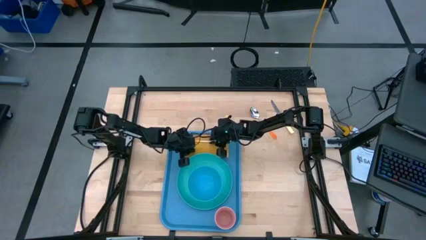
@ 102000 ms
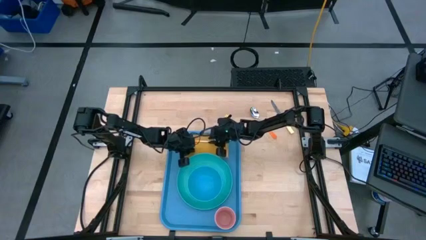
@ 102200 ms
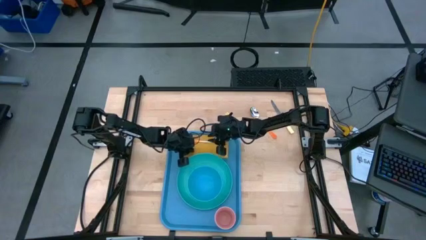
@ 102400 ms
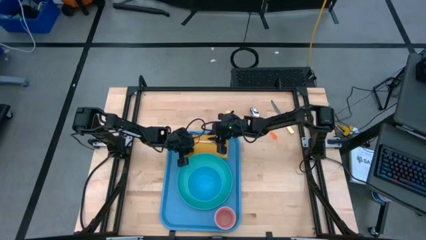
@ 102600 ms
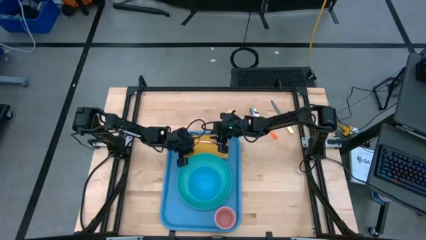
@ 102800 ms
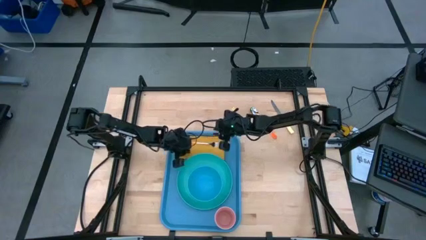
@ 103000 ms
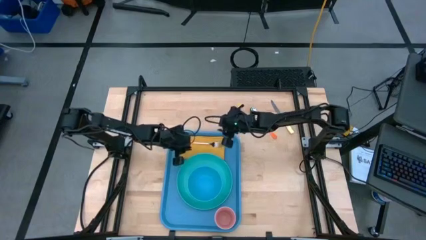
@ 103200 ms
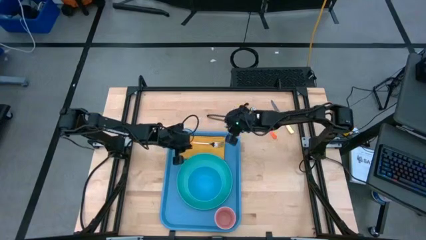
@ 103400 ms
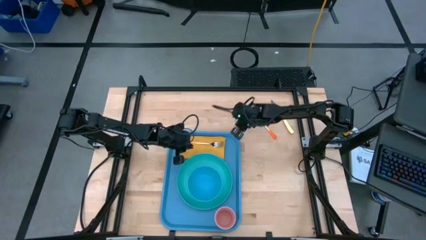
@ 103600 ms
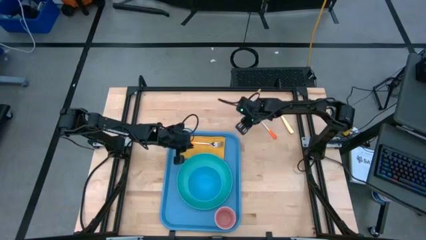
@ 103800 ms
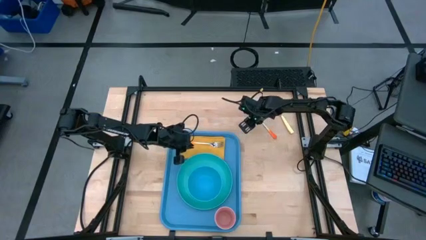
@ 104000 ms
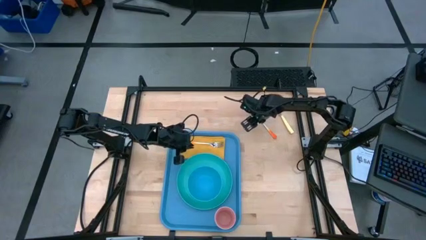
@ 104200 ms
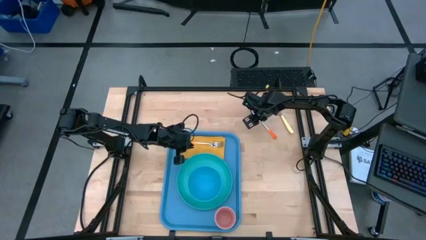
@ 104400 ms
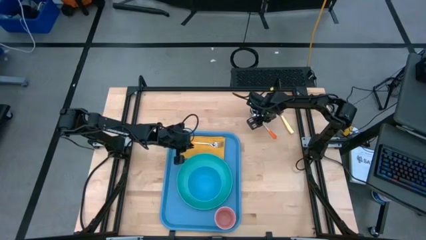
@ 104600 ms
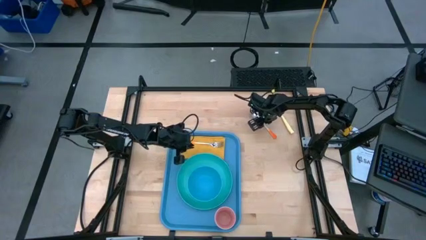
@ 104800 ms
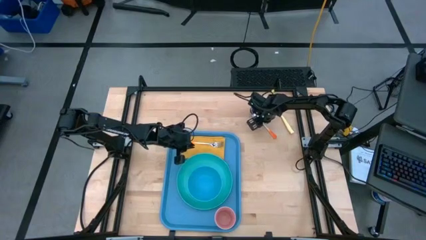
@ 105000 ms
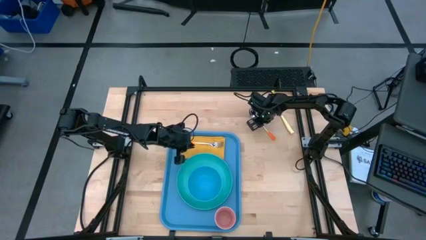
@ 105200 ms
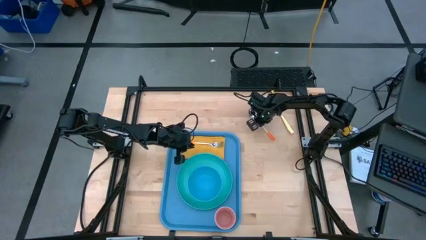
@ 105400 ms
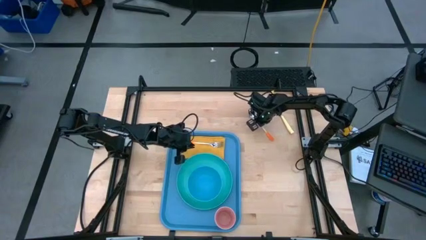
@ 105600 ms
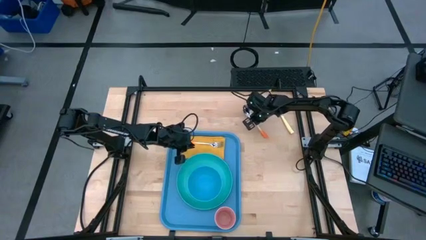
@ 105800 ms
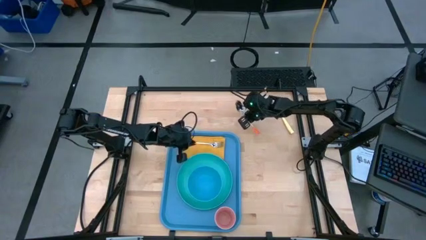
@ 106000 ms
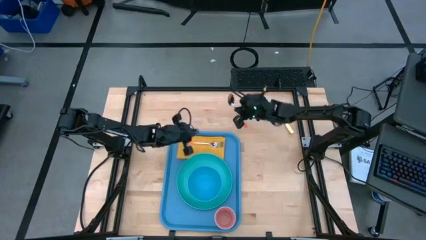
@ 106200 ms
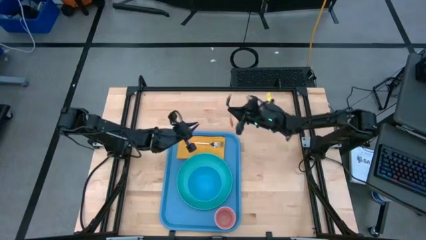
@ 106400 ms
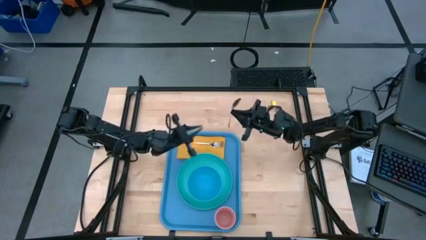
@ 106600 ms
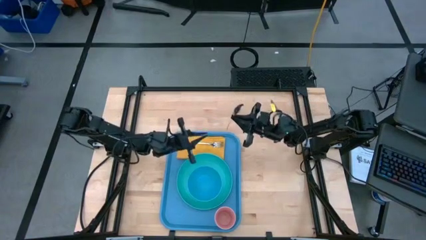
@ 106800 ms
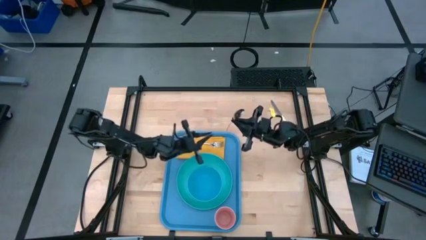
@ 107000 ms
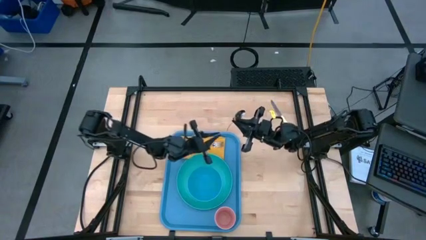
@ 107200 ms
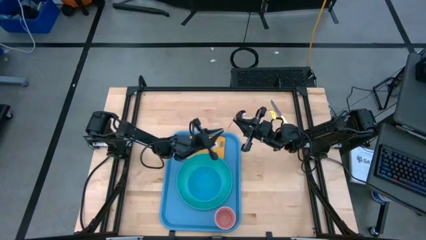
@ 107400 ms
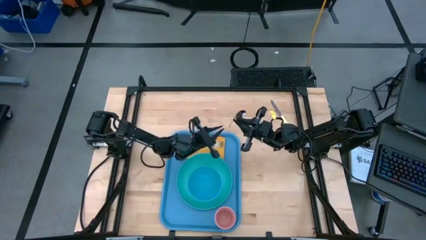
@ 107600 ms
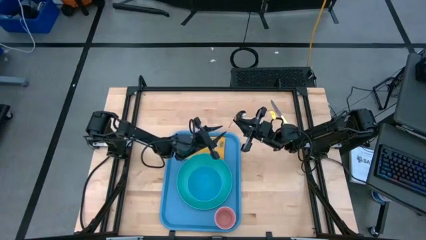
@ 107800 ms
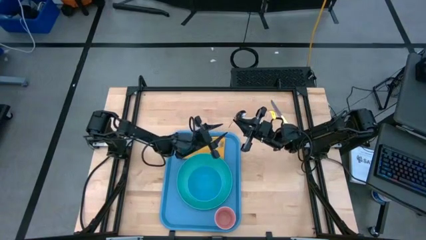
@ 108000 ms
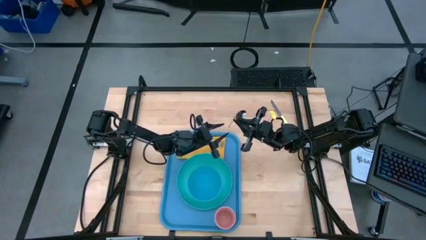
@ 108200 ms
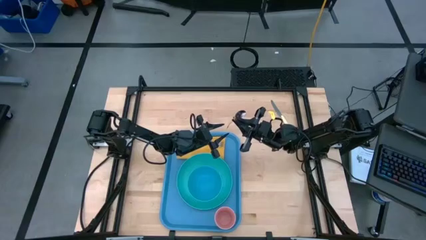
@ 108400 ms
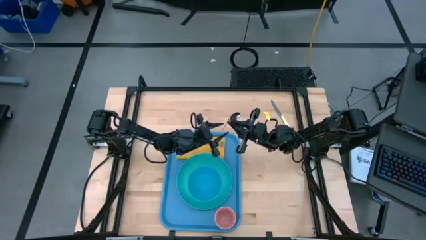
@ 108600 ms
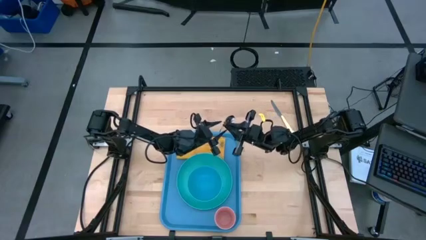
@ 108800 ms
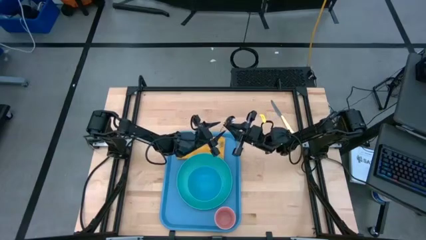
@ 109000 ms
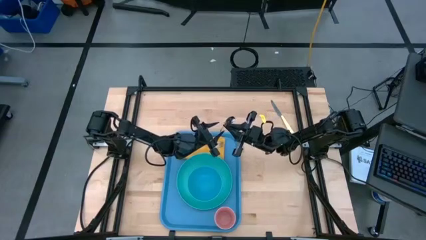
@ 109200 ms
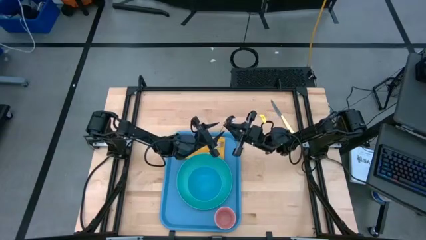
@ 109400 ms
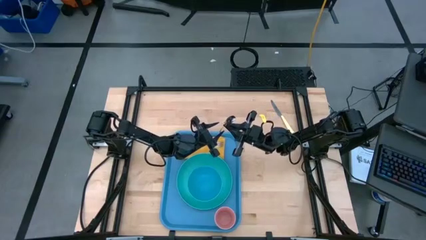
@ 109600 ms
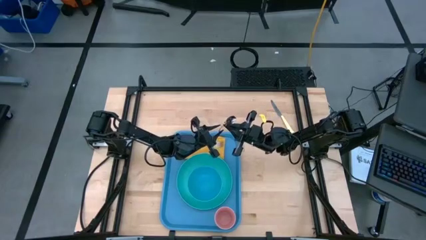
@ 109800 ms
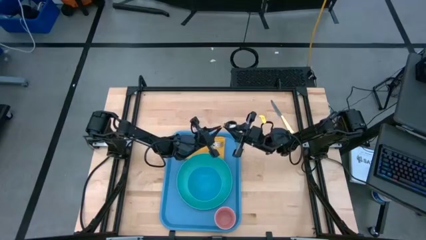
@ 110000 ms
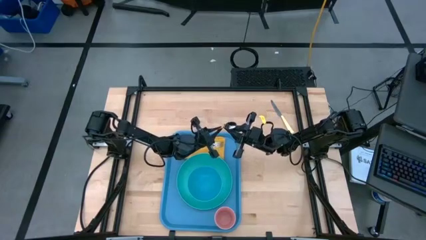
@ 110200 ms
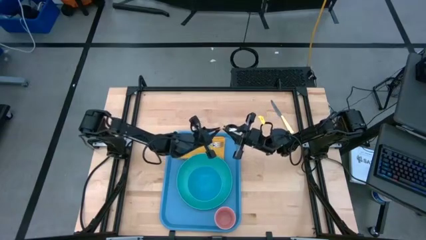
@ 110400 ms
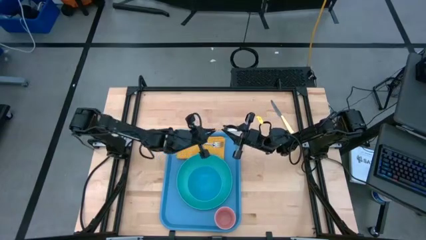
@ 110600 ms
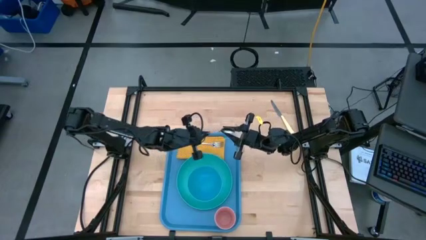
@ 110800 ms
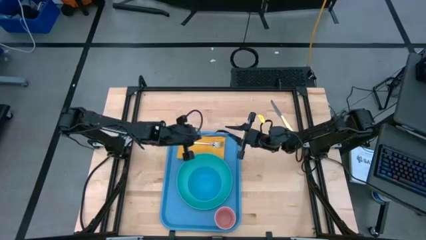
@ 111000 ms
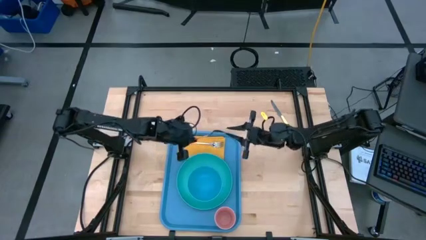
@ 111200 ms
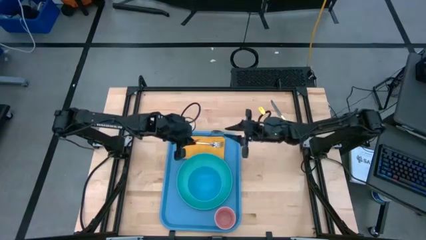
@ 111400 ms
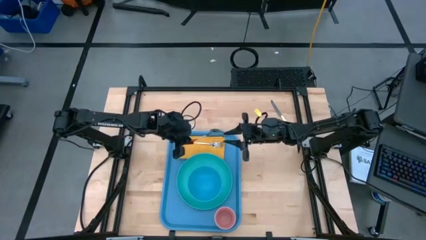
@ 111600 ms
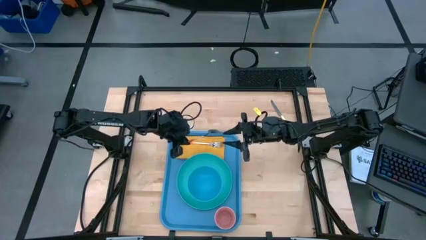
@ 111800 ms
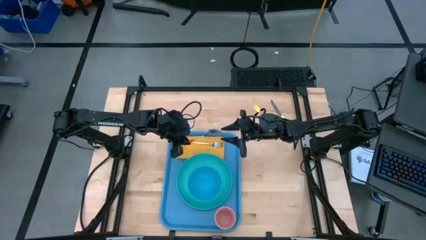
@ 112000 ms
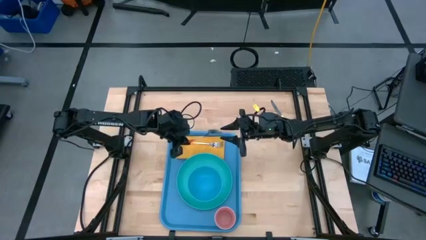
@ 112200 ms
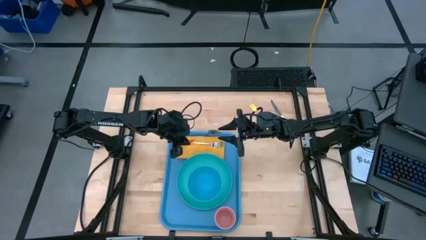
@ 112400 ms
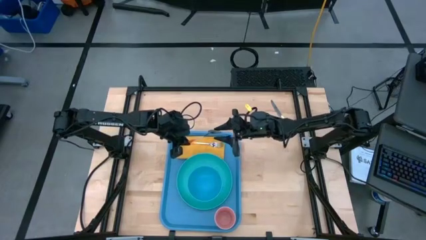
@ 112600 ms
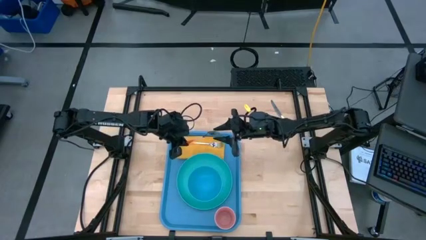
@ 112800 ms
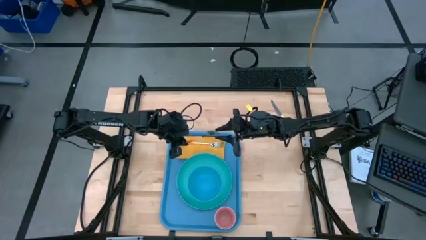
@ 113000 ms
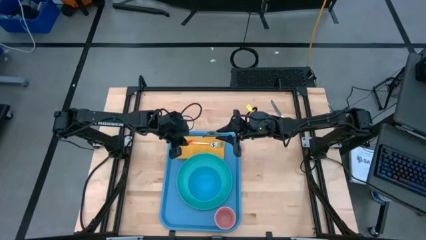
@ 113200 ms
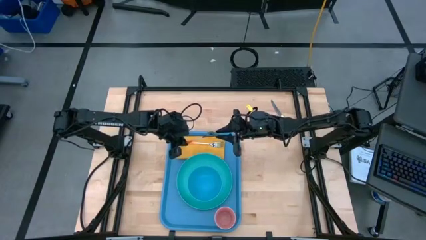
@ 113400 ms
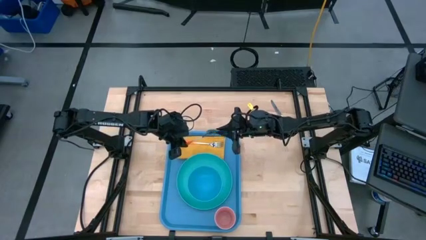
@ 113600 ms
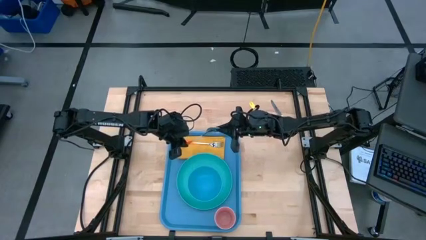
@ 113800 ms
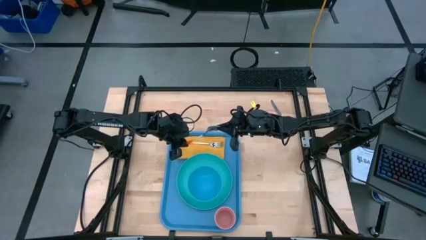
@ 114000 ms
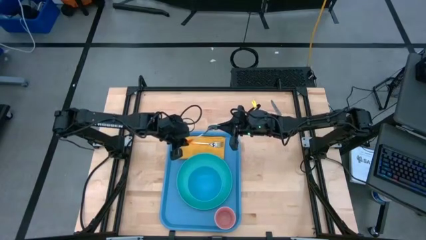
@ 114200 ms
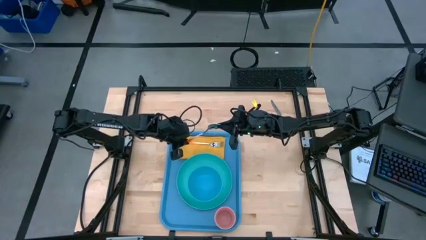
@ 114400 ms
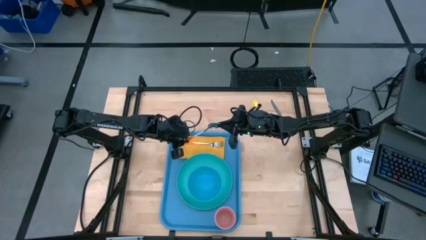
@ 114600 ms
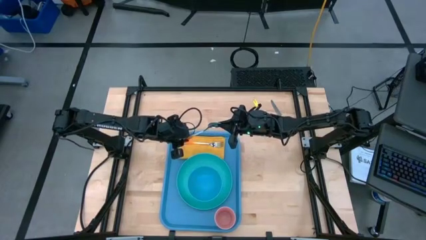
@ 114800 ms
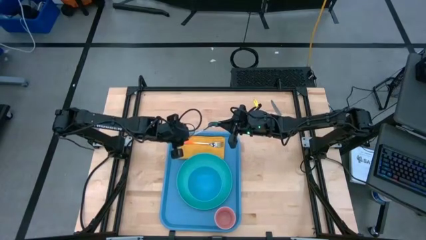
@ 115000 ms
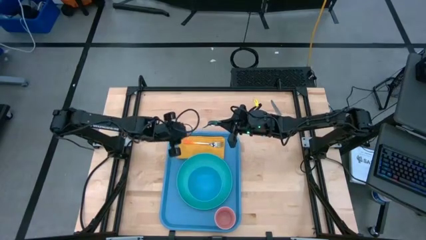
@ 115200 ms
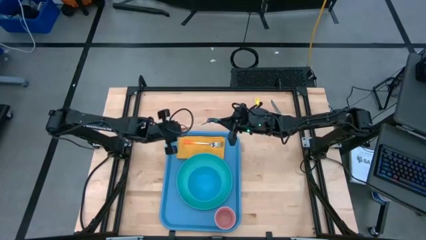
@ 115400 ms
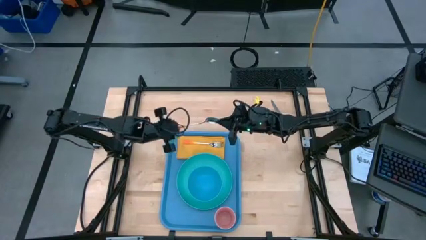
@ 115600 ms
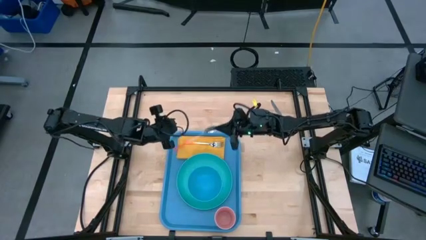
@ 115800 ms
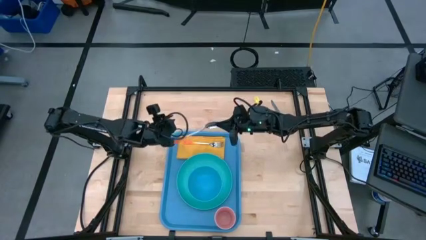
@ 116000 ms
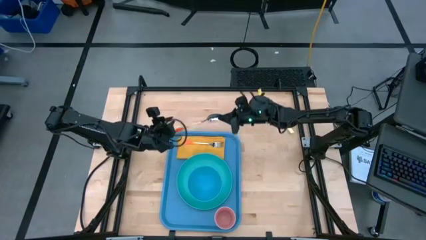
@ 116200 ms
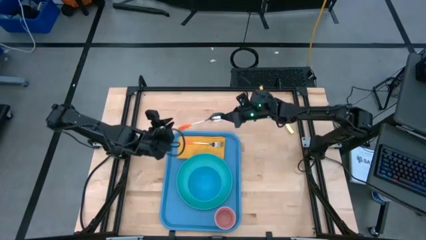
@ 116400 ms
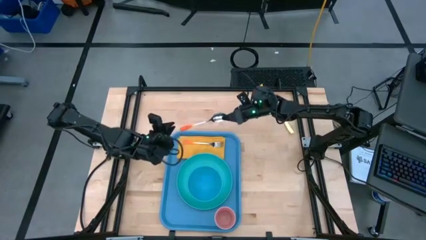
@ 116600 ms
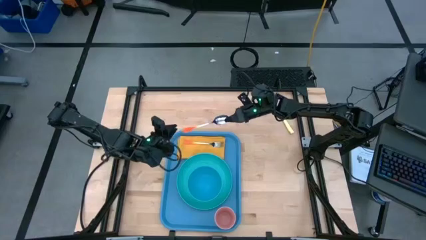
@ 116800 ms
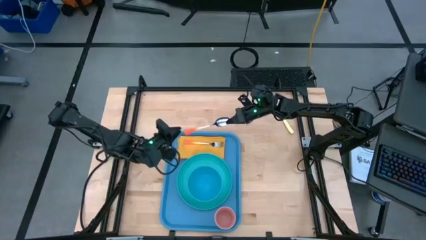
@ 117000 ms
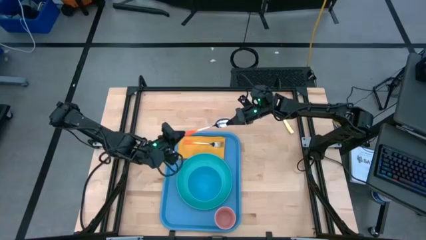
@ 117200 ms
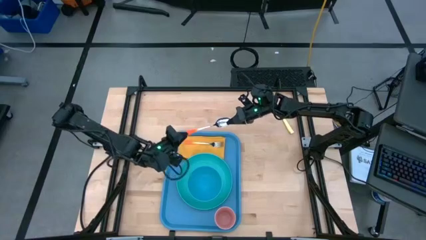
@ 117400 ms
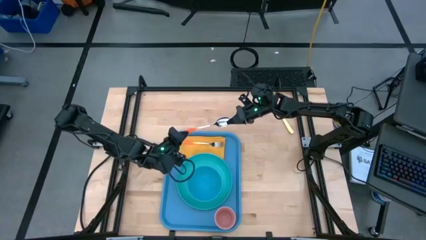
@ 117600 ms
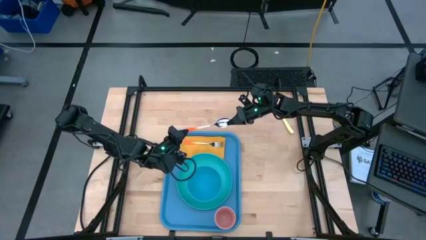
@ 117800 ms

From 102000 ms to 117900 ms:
Task: Set up tray
Put the orange spoon on top of the orange napkin to the bottom of the orange fork
